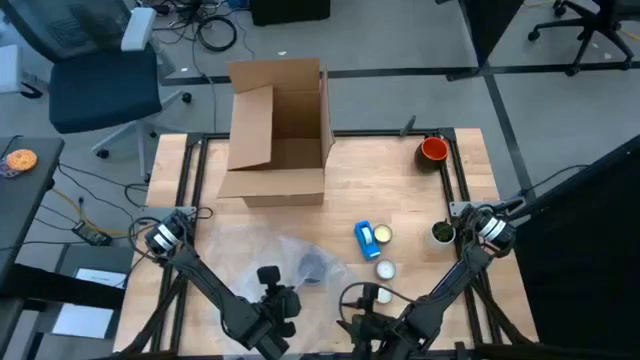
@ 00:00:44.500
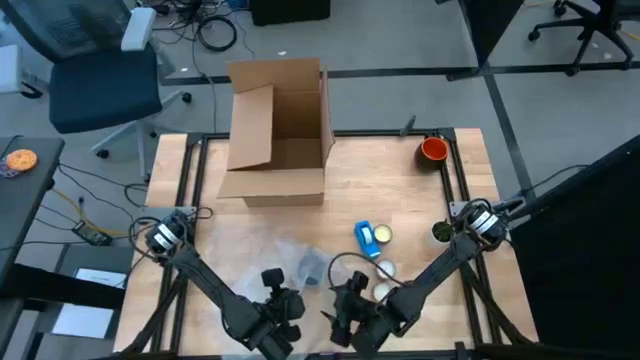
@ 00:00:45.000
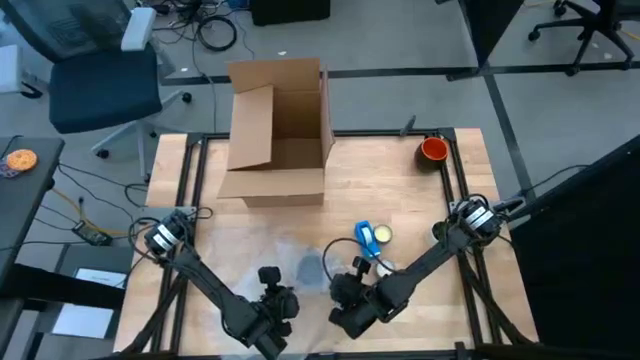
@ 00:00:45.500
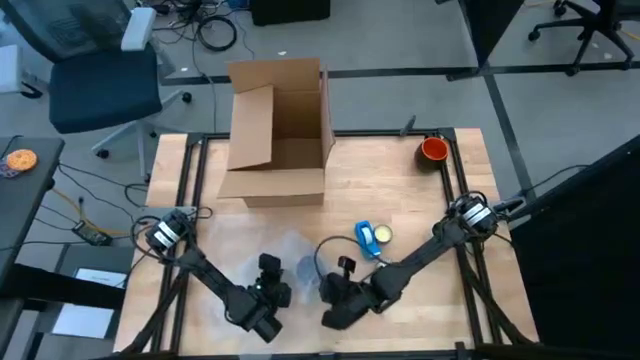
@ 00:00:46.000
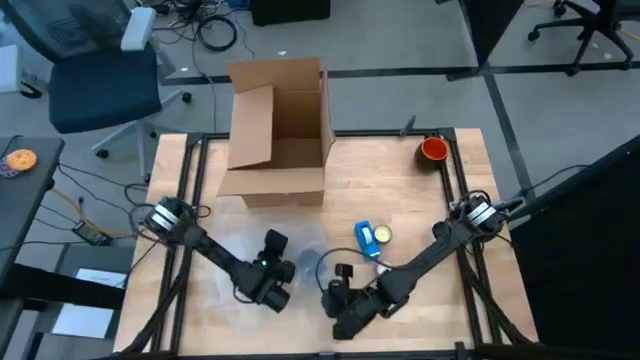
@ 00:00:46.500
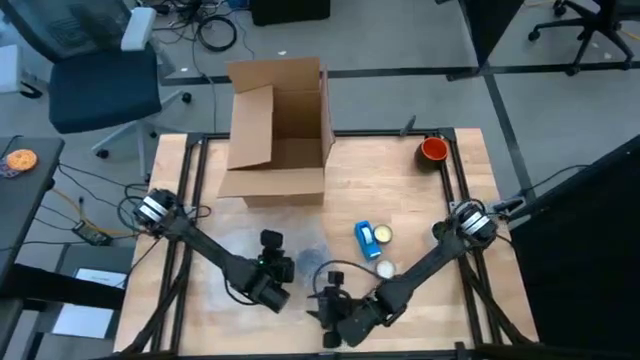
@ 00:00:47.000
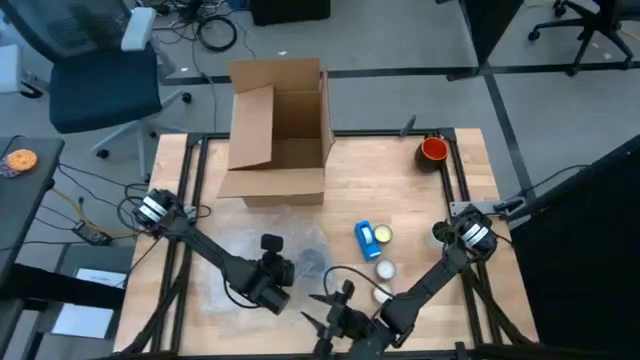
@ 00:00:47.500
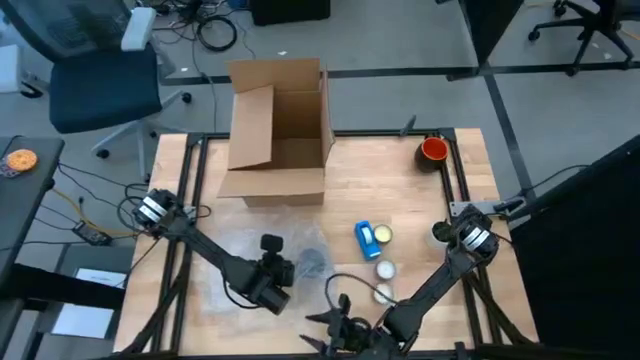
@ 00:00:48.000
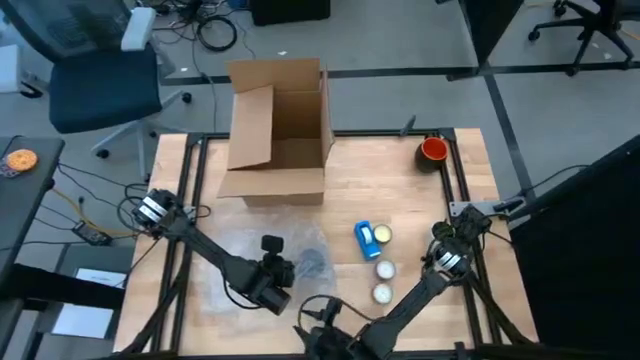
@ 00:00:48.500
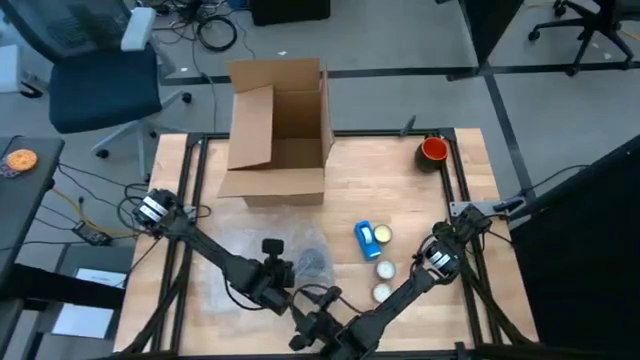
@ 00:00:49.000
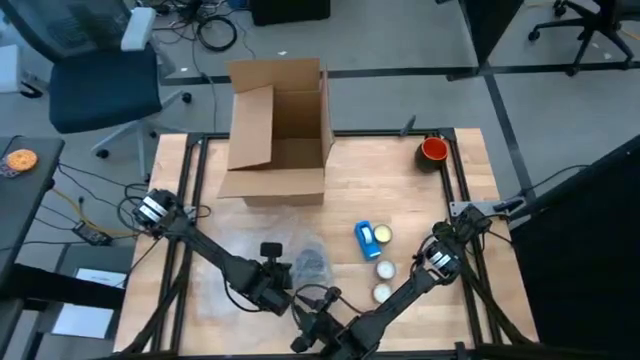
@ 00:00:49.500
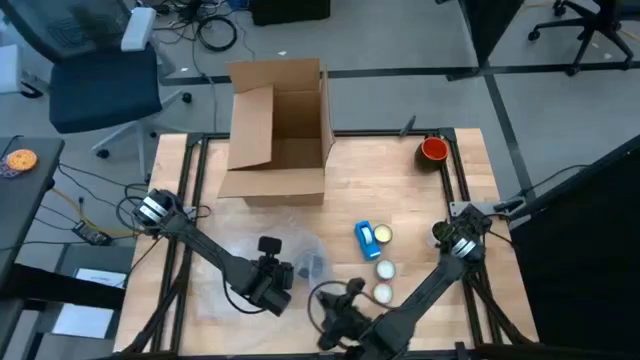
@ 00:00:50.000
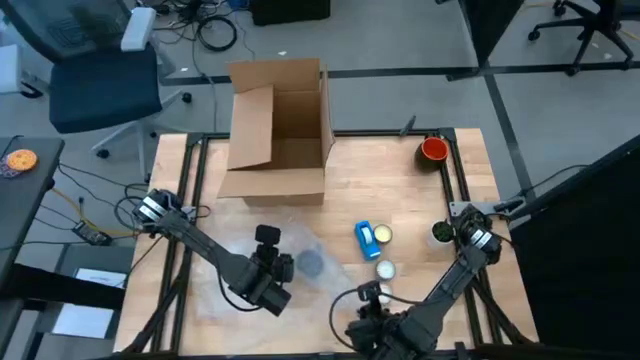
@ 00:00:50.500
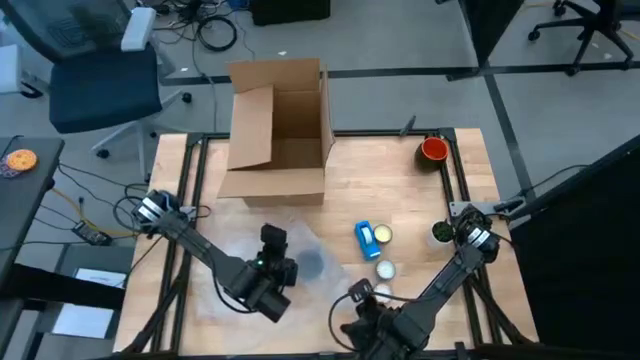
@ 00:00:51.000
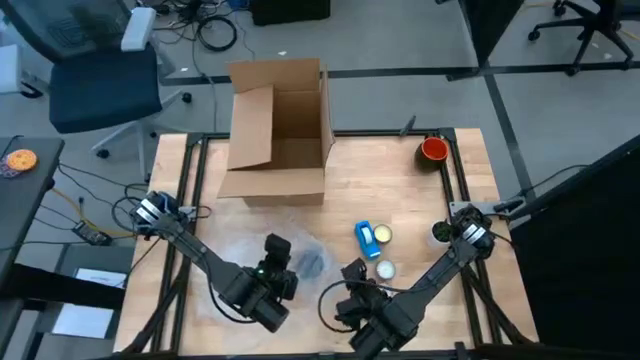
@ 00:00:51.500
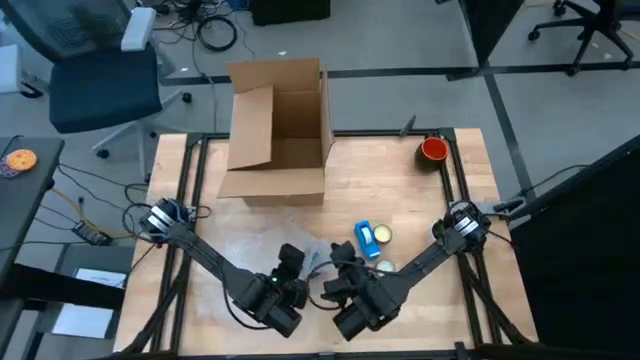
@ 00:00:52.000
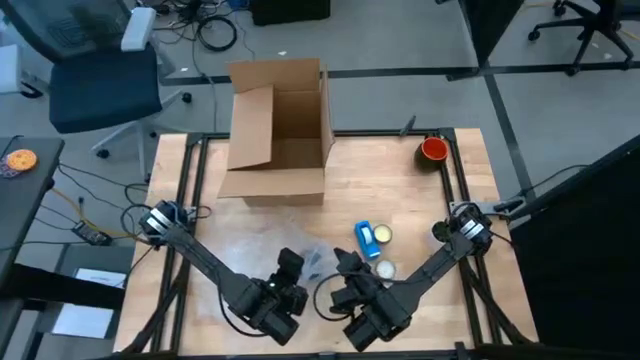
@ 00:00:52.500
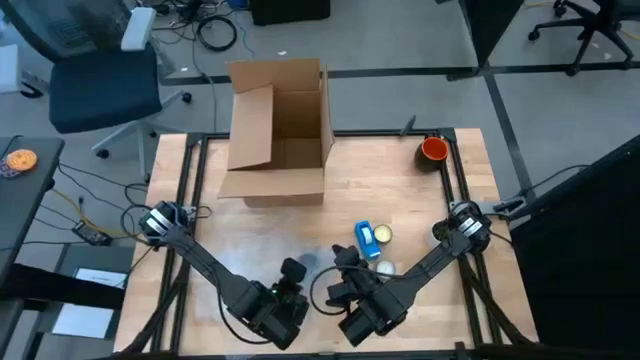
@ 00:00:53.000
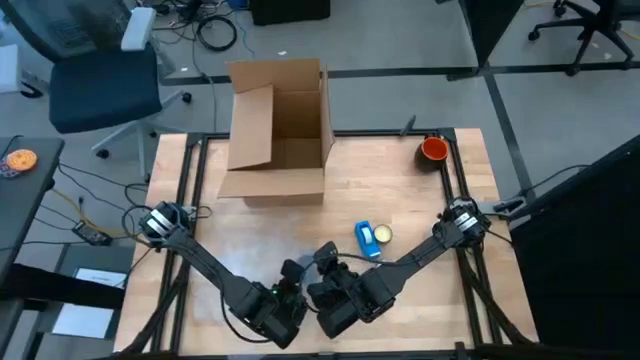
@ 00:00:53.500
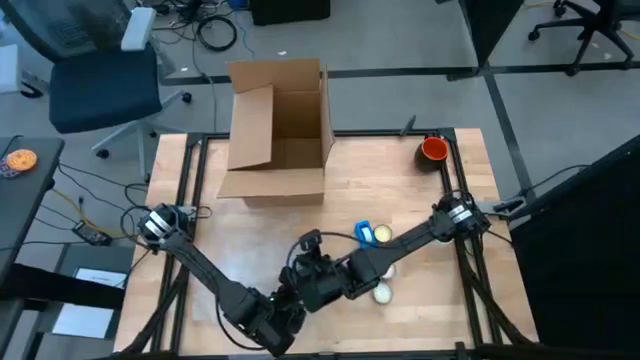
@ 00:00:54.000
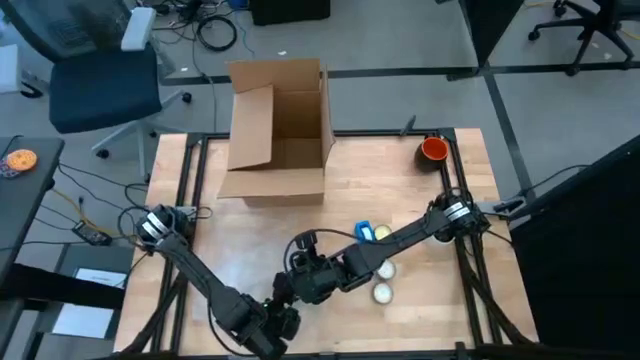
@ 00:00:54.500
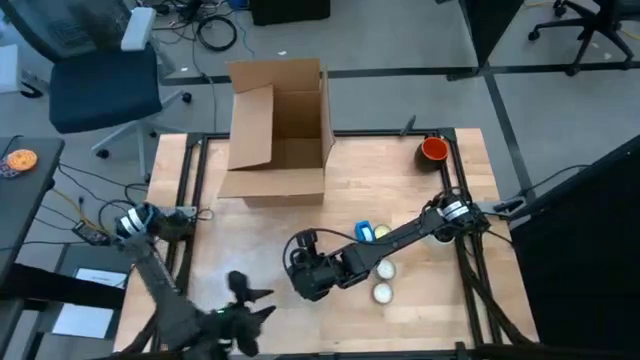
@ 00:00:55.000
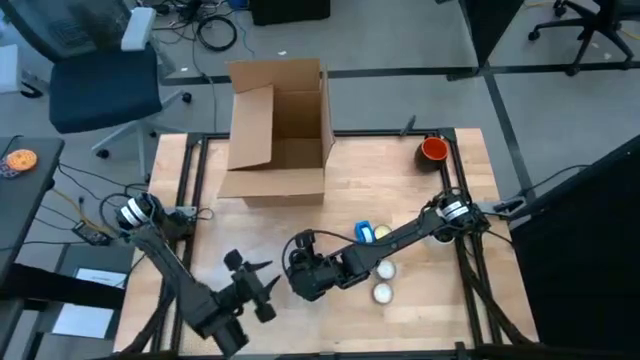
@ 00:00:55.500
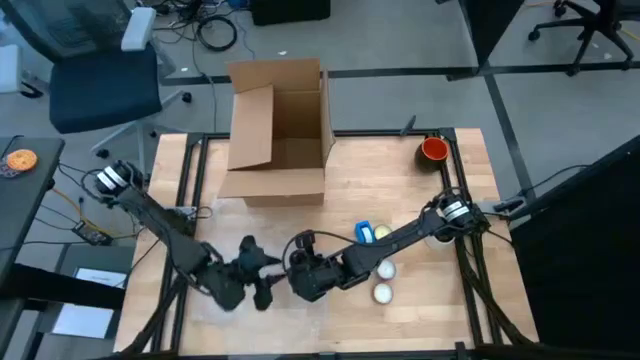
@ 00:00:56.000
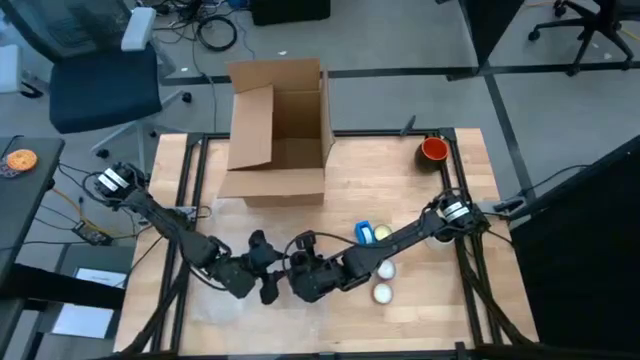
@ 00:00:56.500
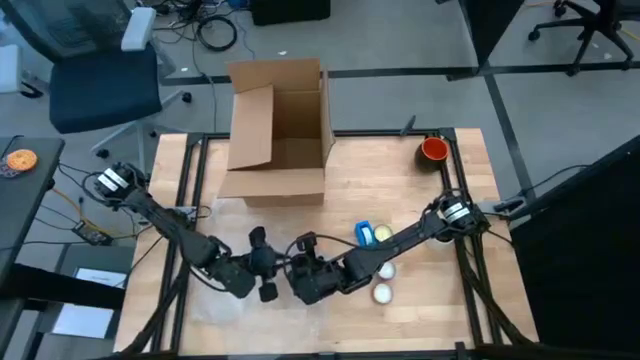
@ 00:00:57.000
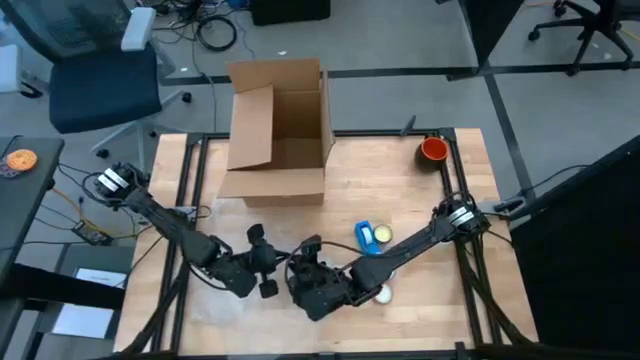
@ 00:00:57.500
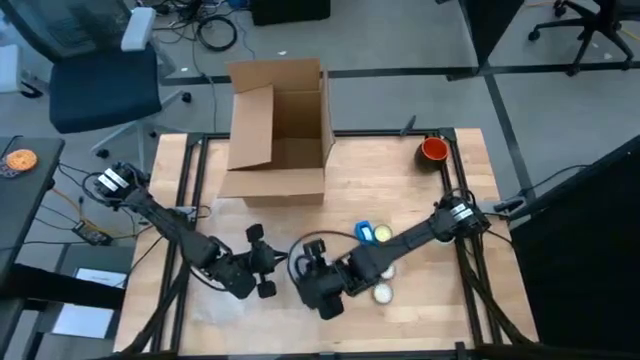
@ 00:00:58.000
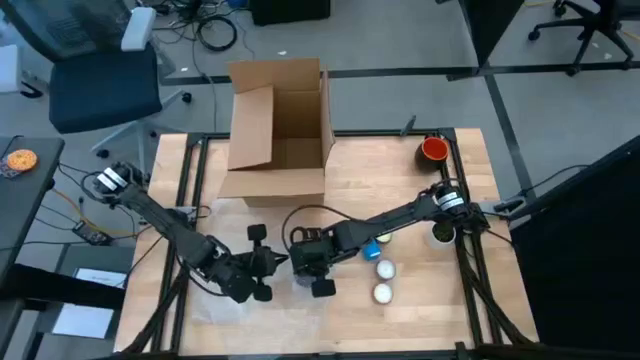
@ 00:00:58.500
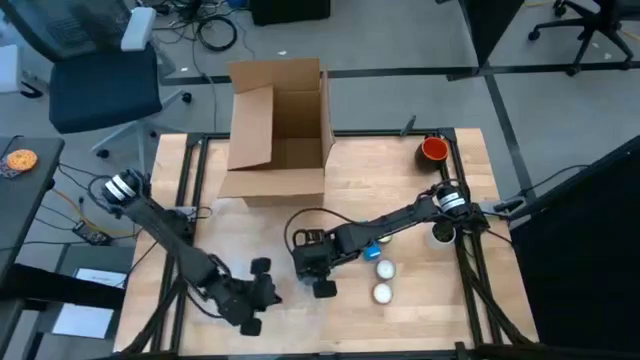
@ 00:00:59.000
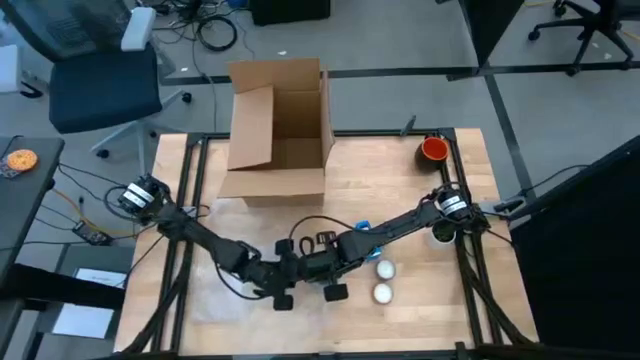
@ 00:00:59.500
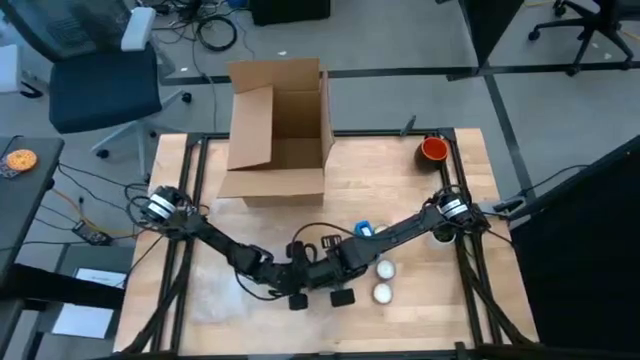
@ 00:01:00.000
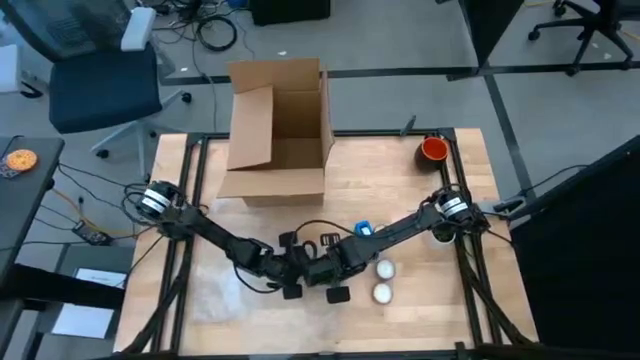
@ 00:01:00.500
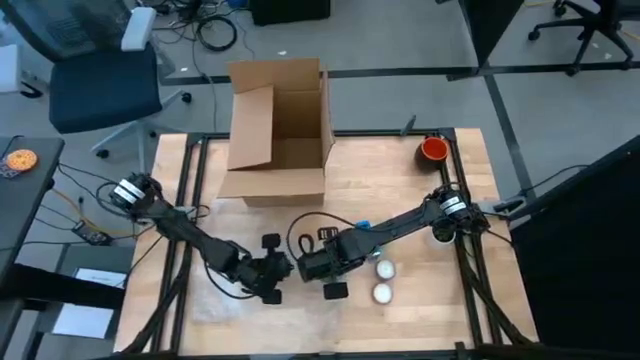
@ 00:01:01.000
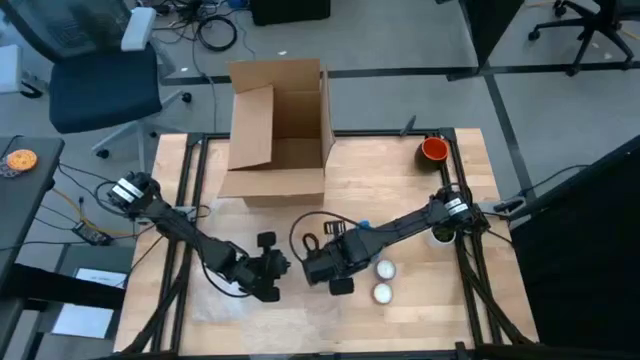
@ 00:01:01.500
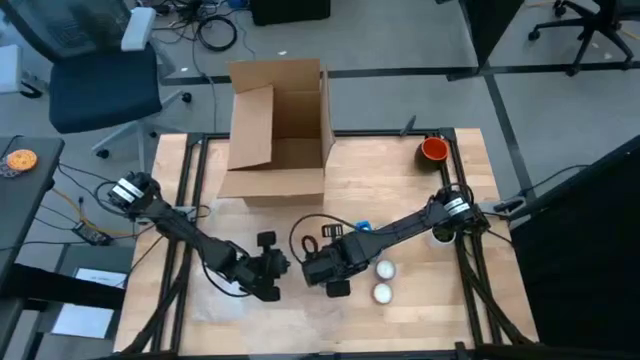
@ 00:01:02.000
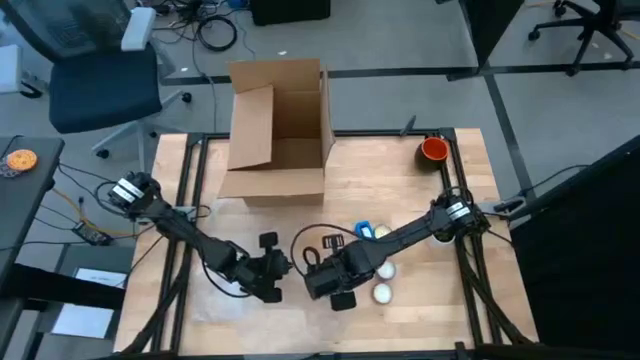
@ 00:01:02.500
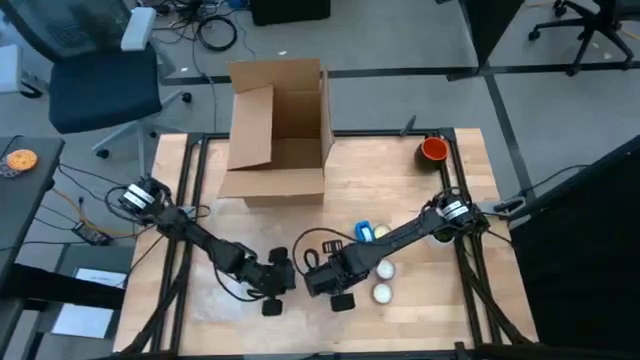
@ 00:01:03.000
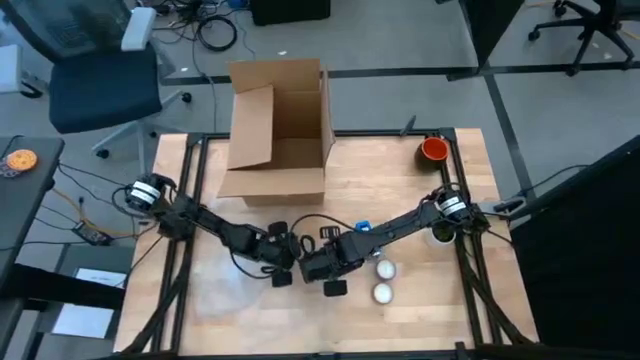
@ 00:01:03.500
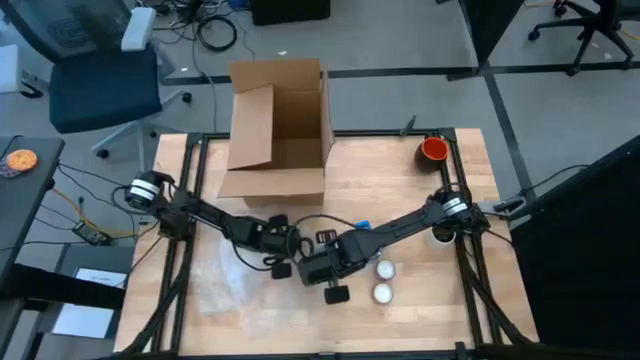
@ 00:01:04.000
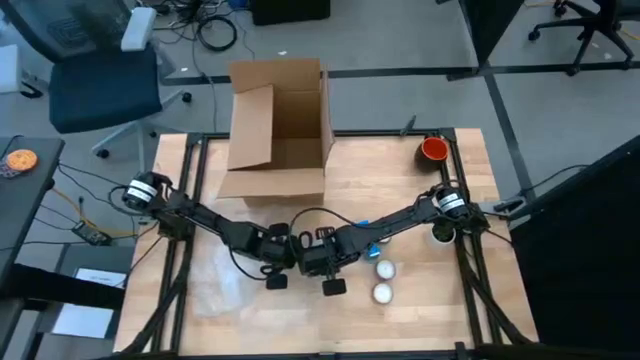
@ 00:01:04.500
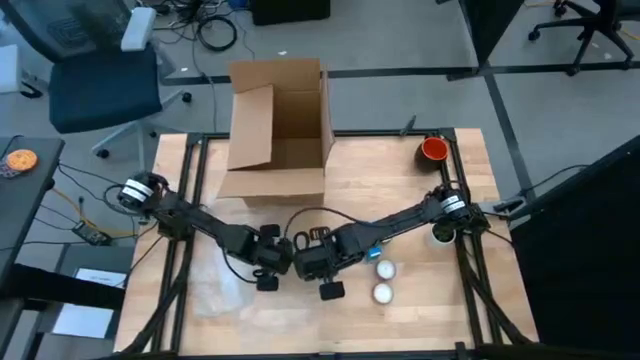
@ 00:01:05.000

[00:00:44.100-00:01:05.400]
Task: wrap mug
Wrap the blue mug with the bubble wrap
